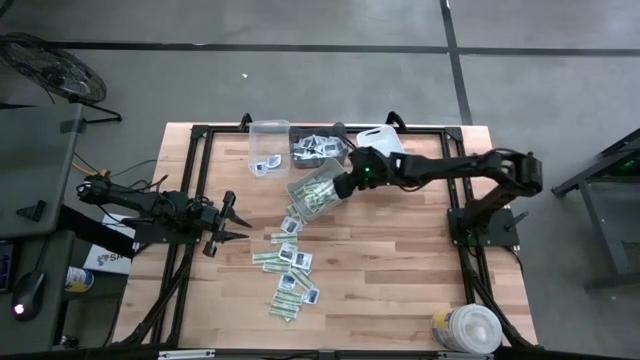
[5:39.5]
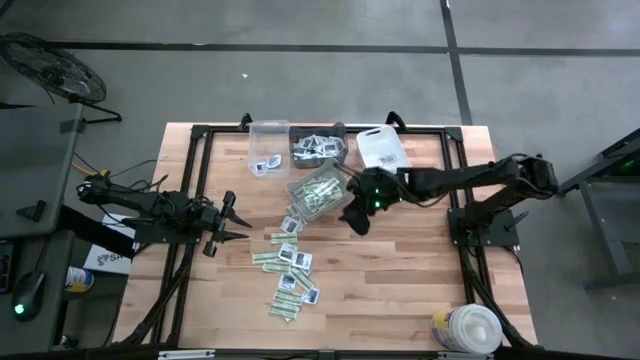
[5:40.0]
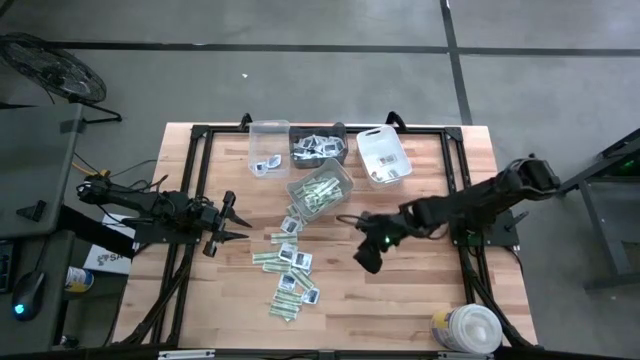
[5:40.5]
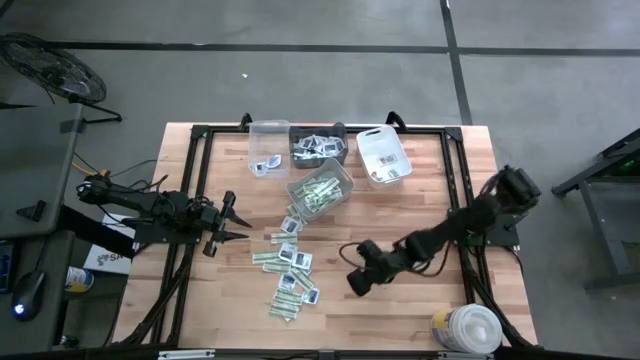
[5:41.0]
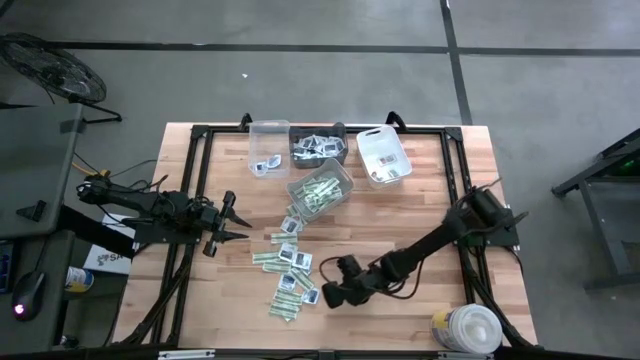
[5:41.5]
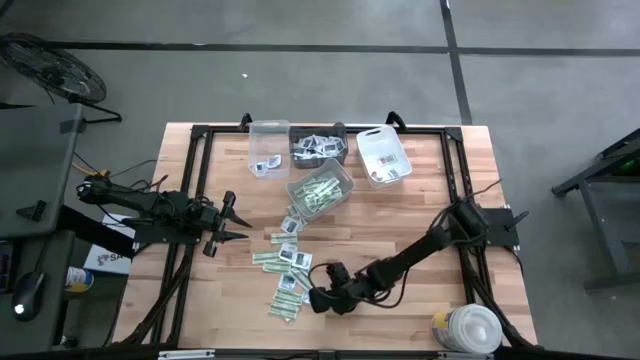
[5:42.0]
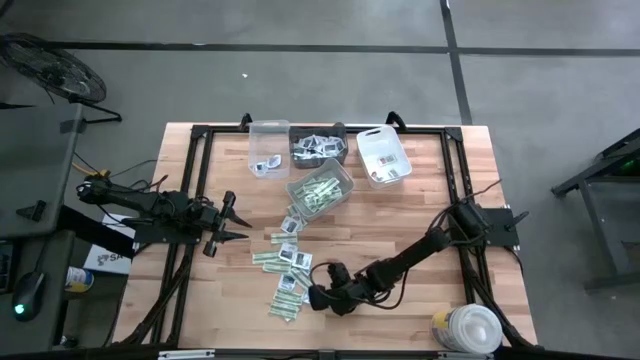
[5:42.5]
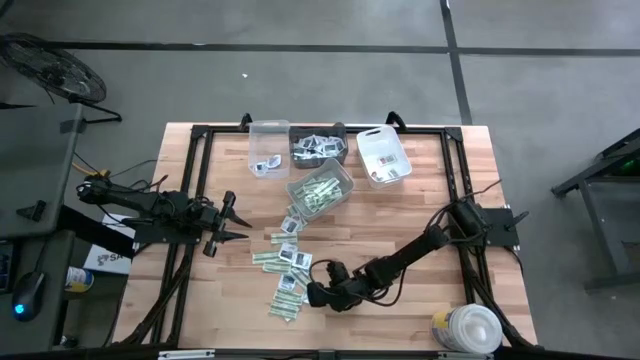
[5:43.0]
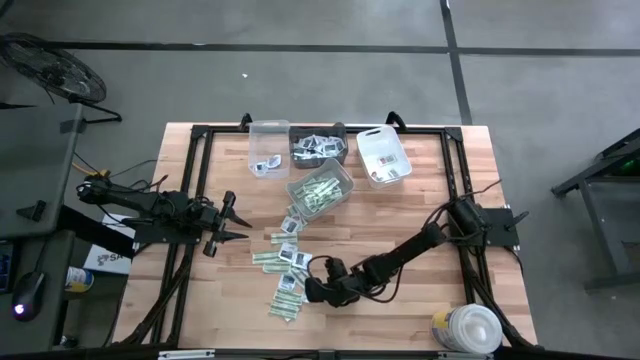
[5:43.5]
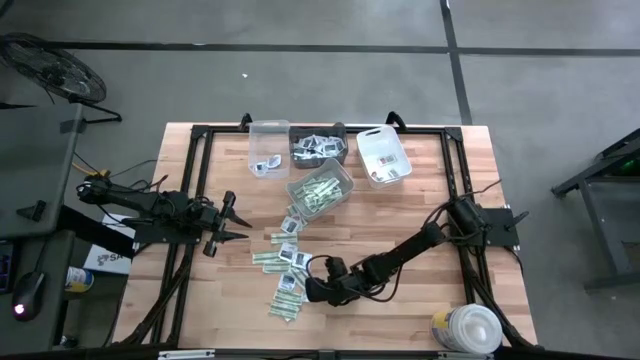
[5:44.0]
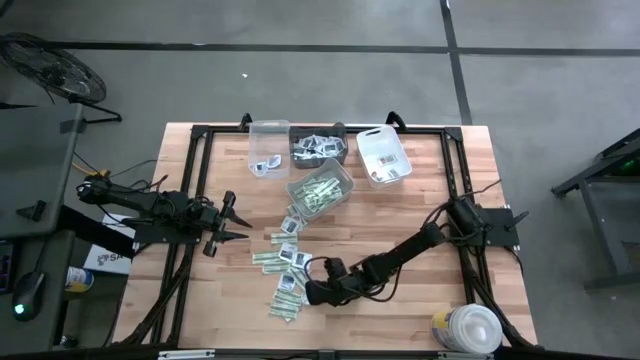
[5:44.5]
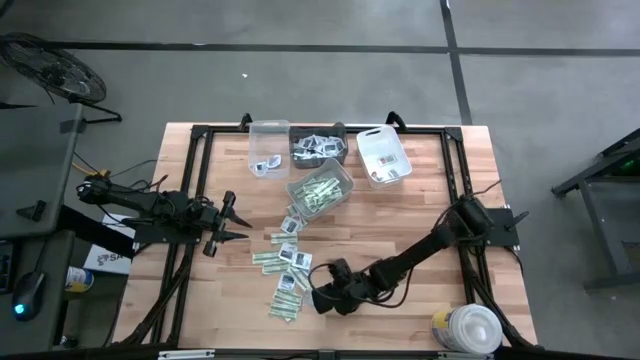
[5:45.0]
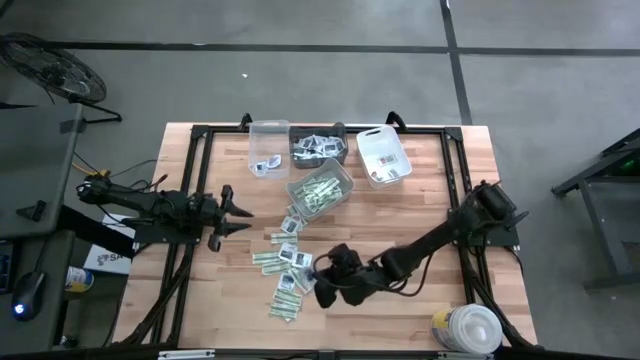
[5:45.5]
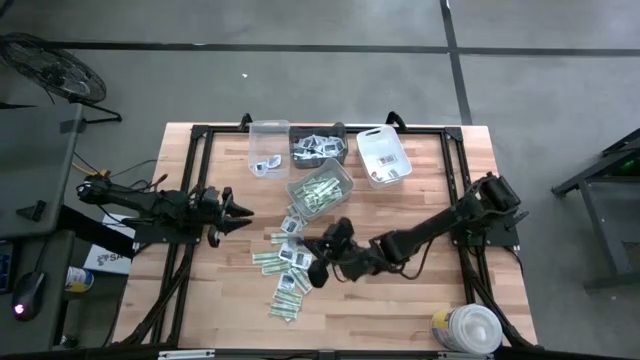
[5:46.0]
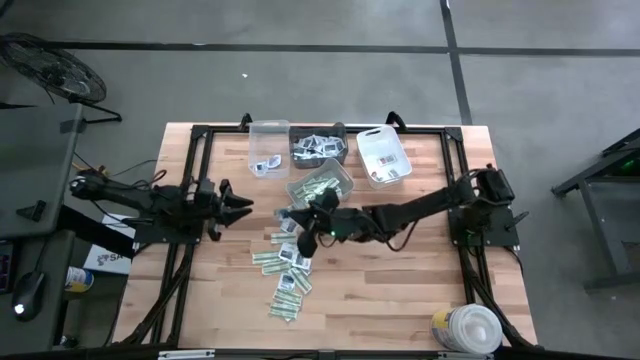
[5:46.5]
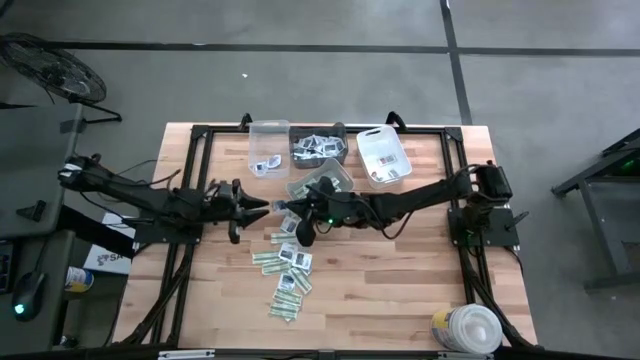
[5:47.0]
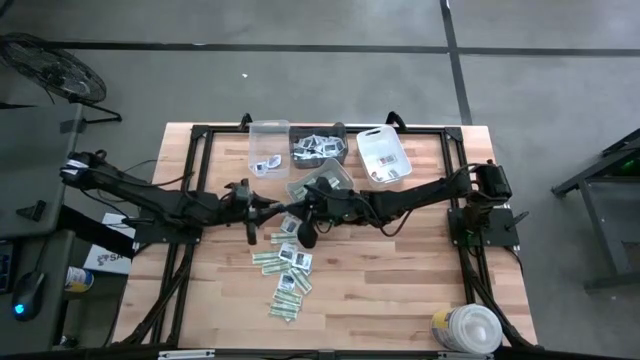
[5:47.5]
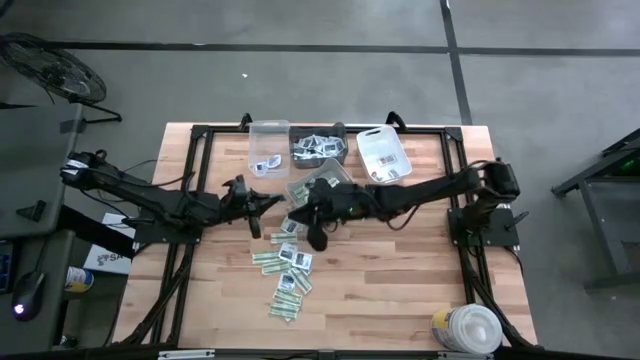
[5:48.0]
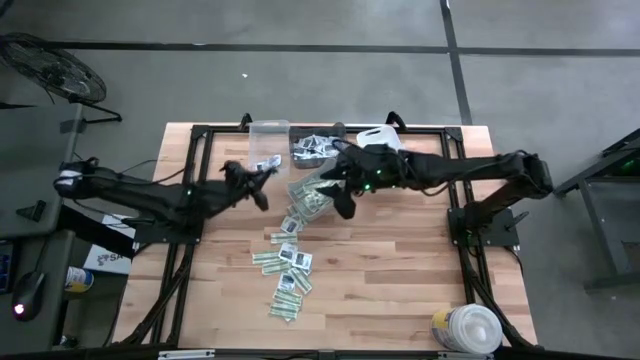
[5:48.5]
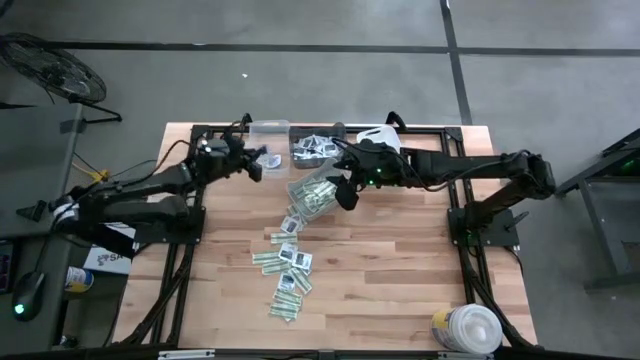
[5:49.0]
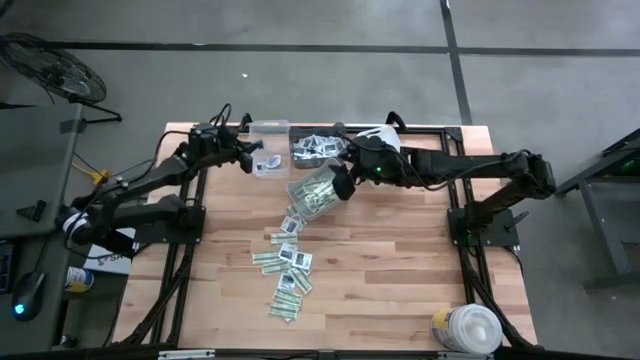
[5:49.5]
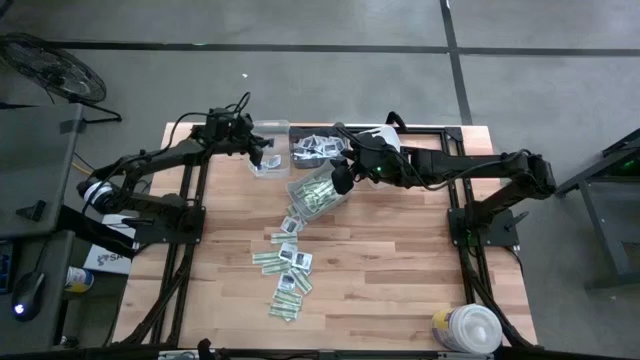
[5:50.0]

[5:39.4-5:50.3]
Task: Pick & Place First Aid Supplies
Put the alcohol pad into the transparent bin

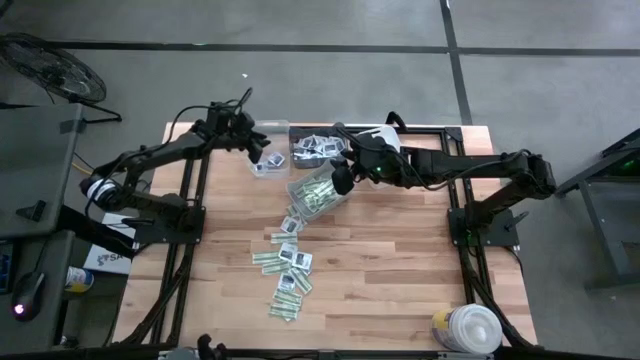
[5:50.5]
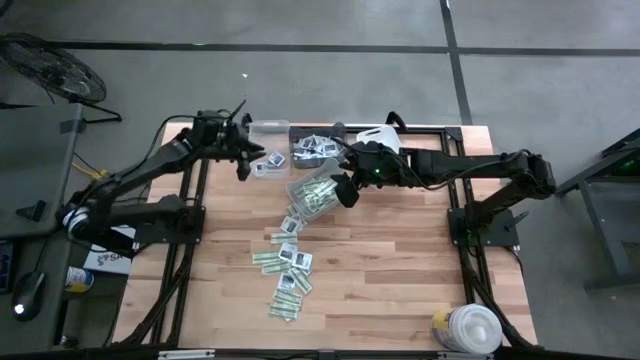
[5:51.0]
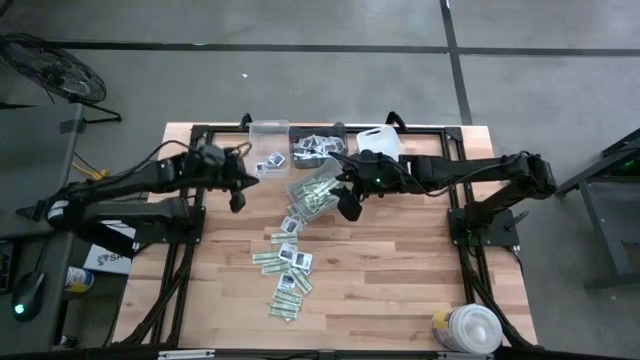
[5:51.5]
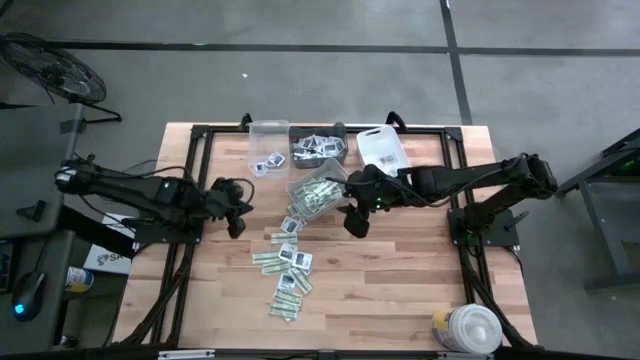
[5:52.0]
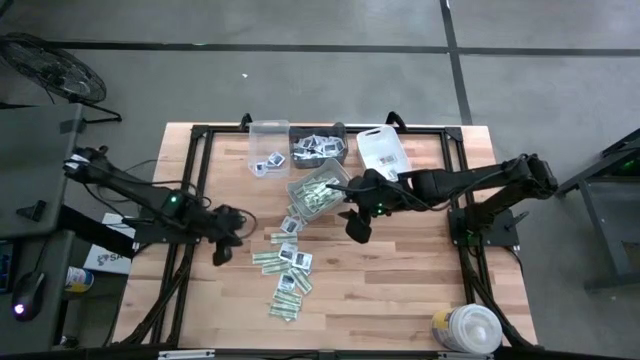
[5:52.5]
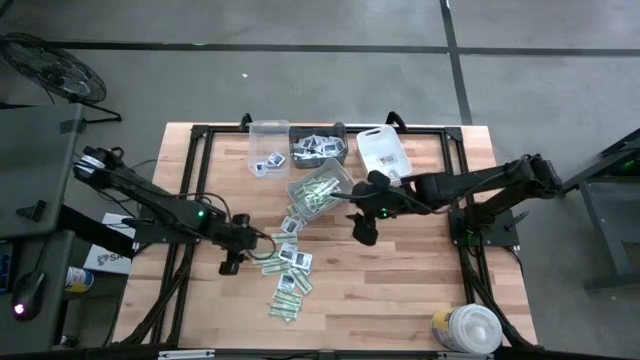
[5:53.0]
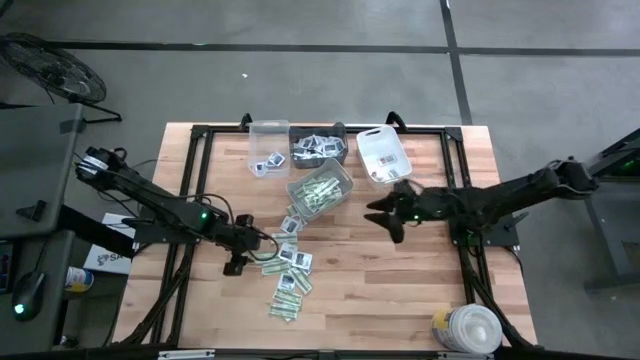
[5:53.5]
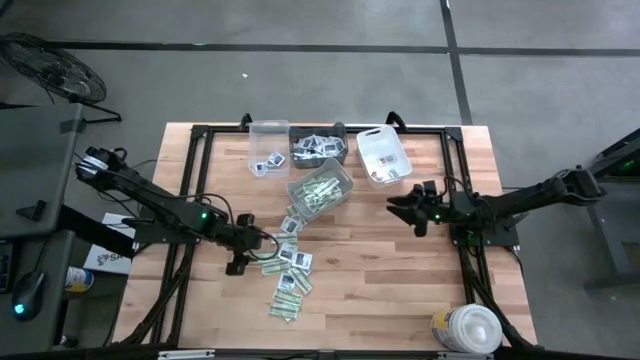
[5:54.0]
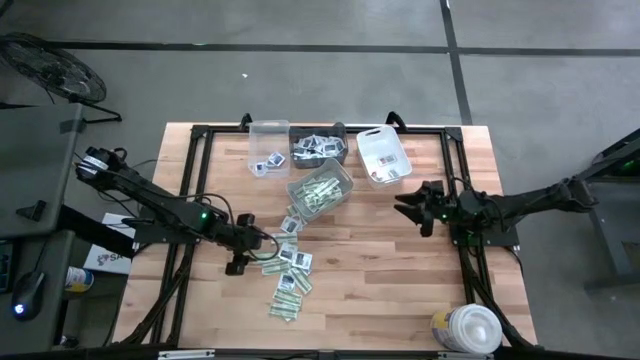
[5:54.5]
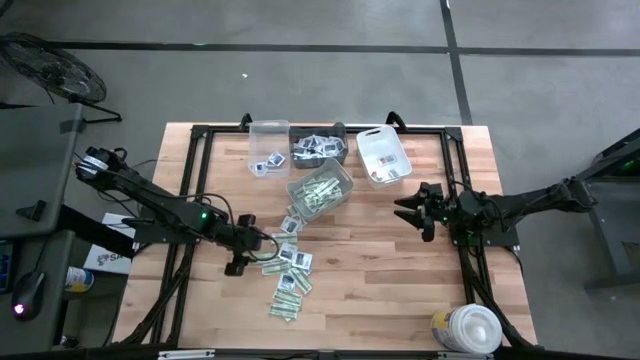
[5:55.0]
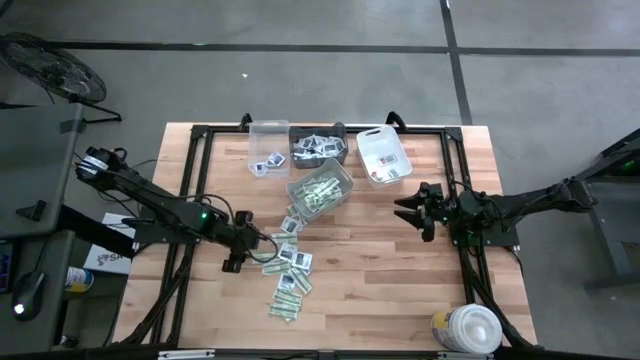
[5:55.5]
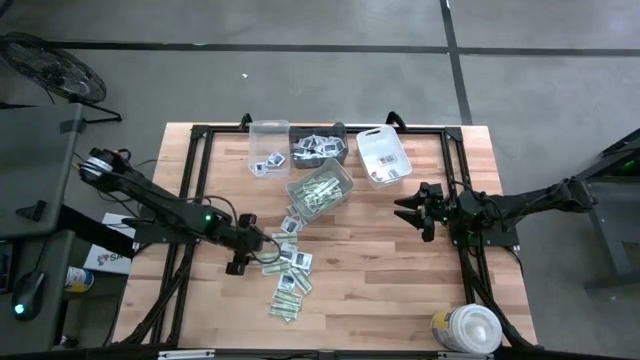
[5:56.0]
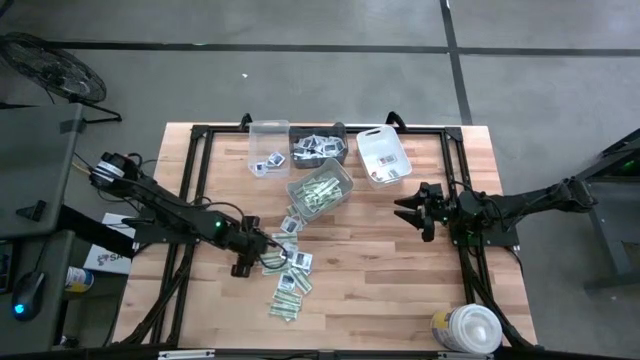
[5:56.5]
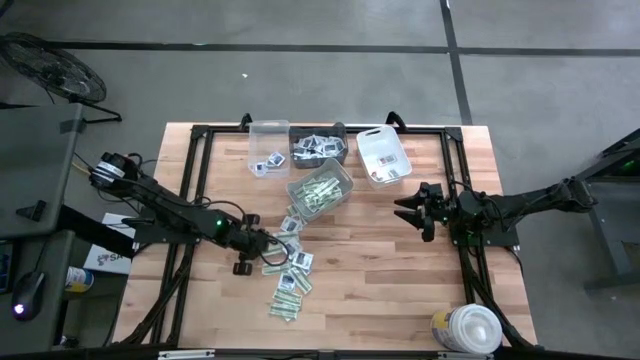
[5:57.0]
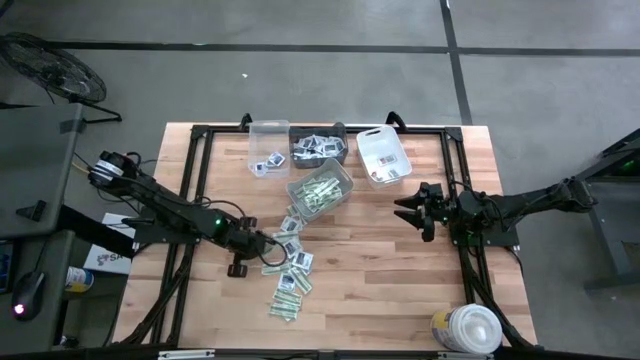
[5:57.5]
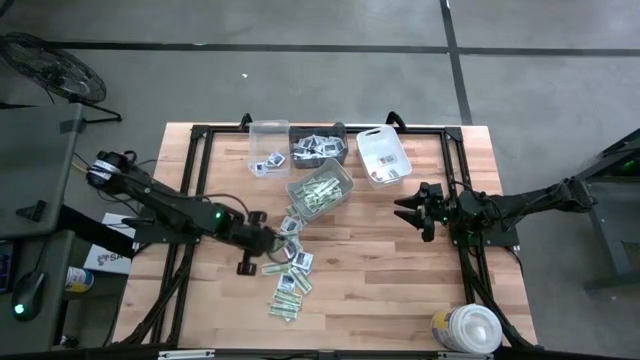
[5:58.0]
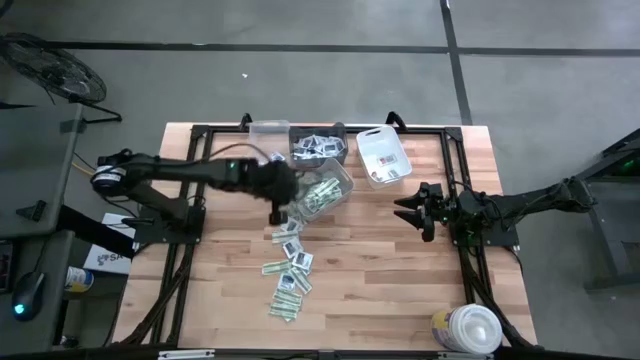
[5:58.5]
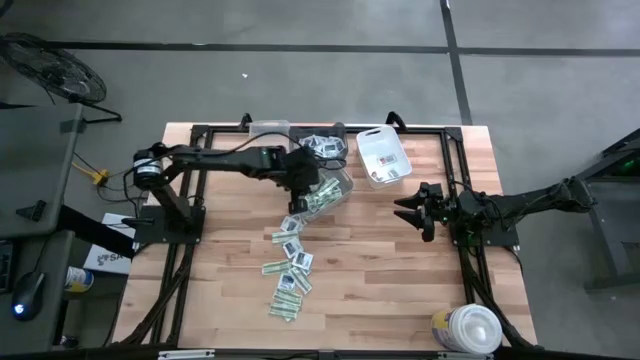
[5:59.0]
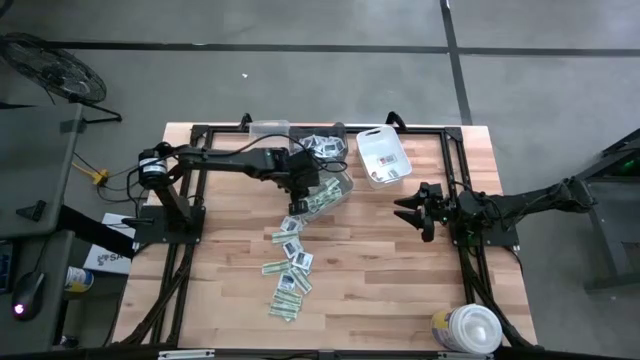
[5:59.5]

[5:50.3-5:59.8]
Put the bandage pack into the gray bin
